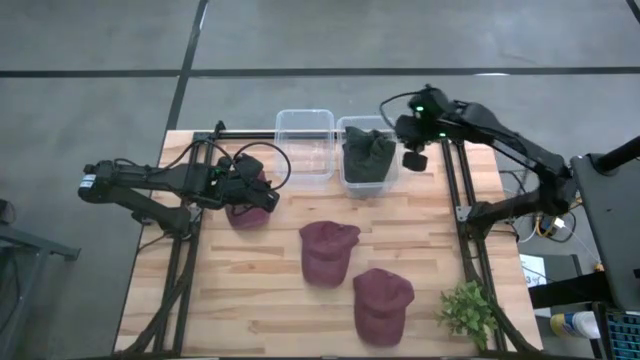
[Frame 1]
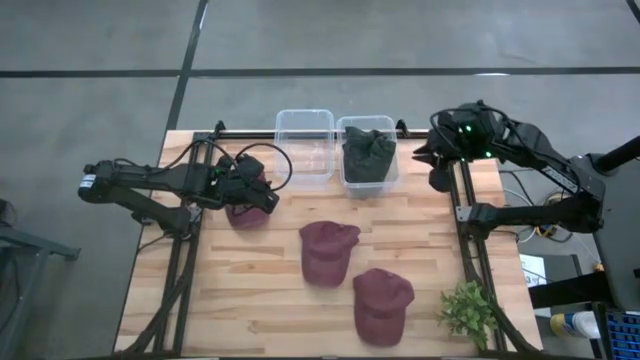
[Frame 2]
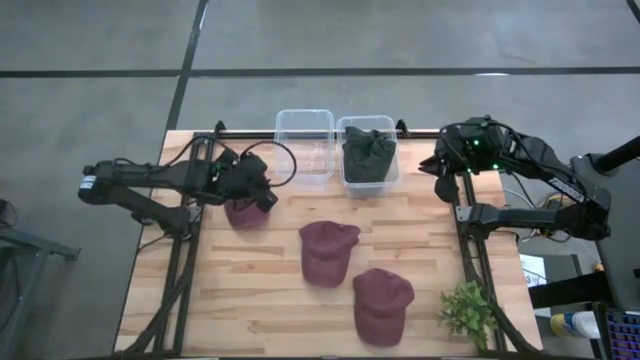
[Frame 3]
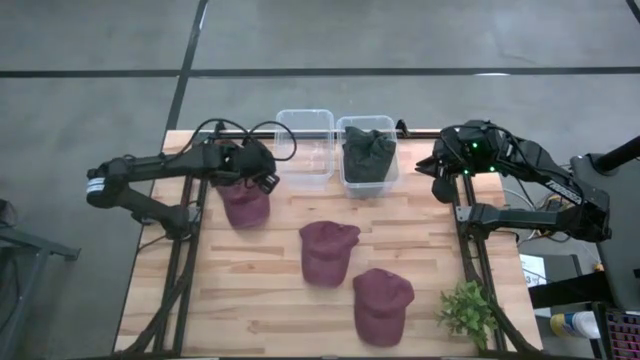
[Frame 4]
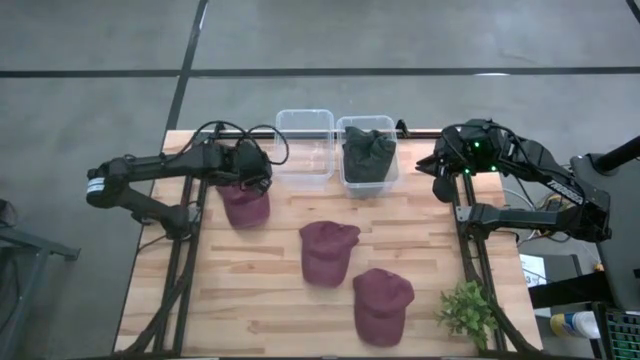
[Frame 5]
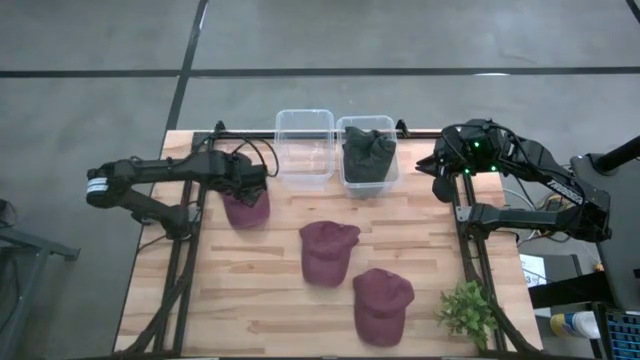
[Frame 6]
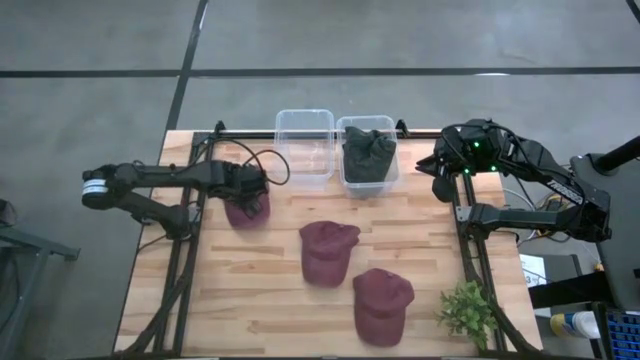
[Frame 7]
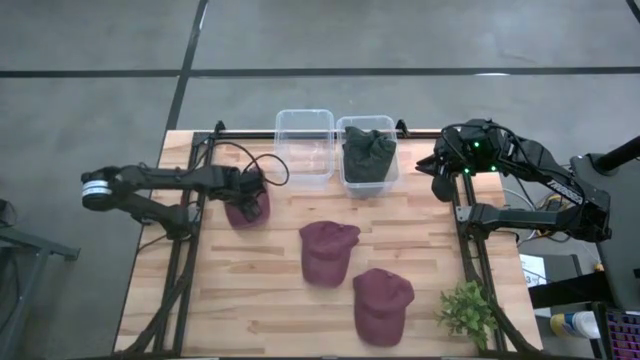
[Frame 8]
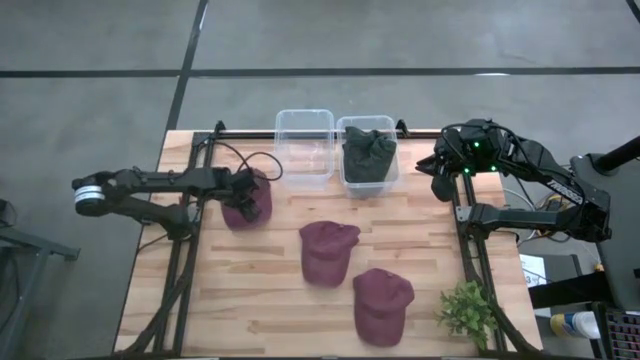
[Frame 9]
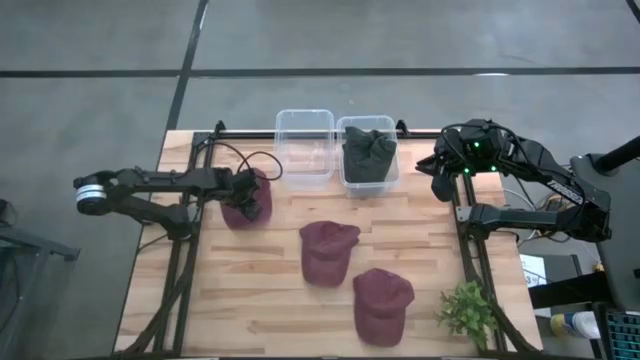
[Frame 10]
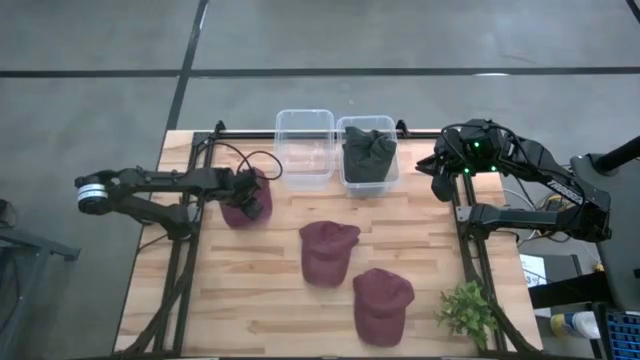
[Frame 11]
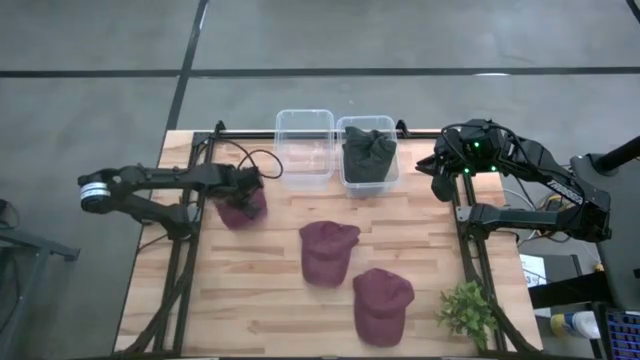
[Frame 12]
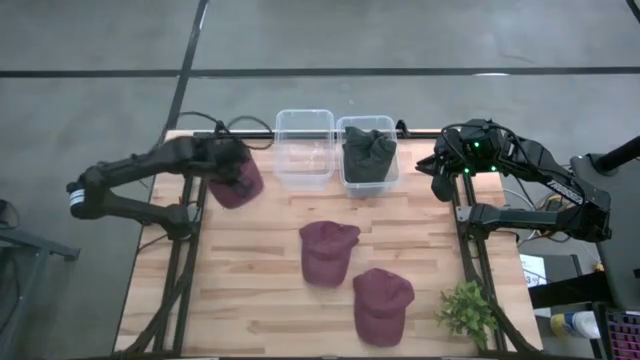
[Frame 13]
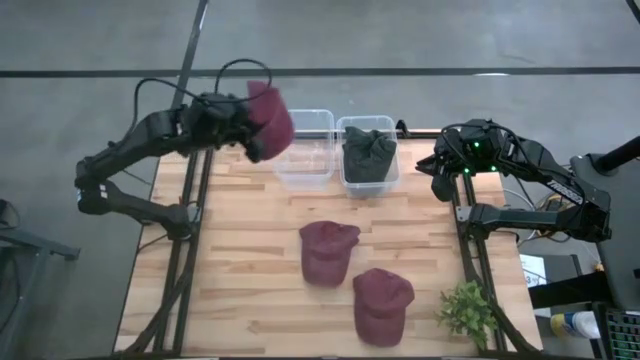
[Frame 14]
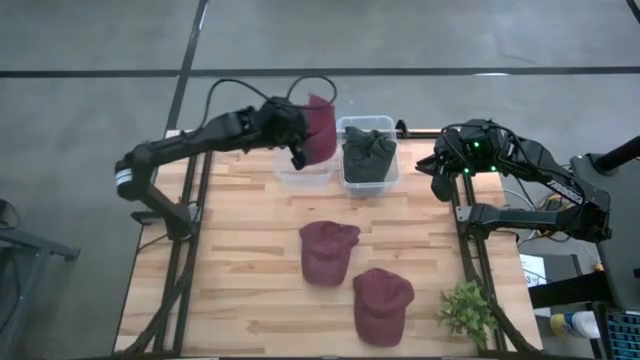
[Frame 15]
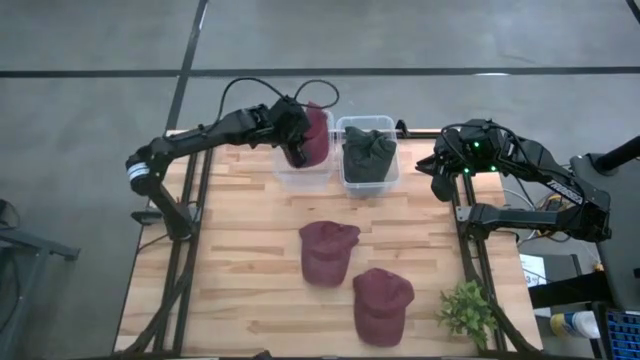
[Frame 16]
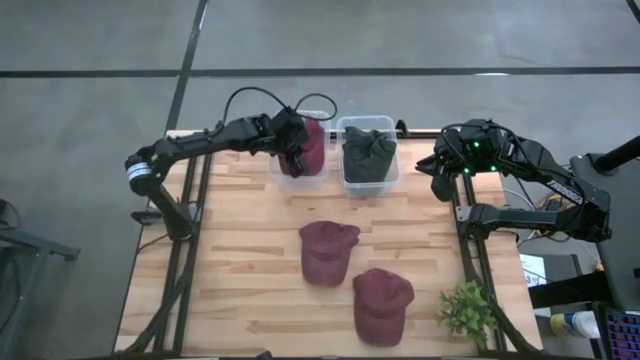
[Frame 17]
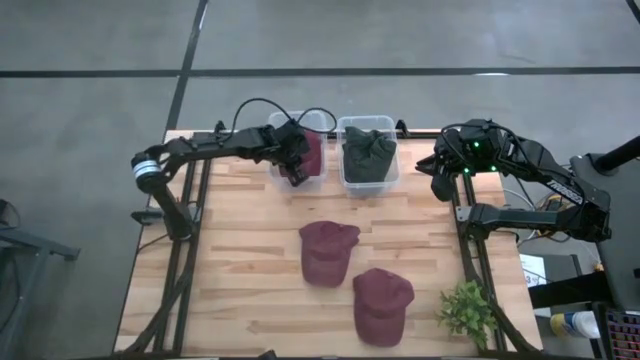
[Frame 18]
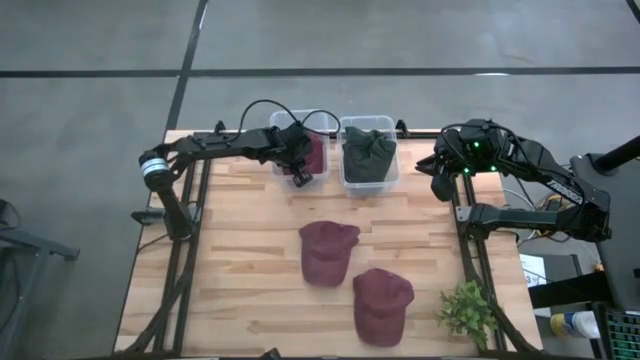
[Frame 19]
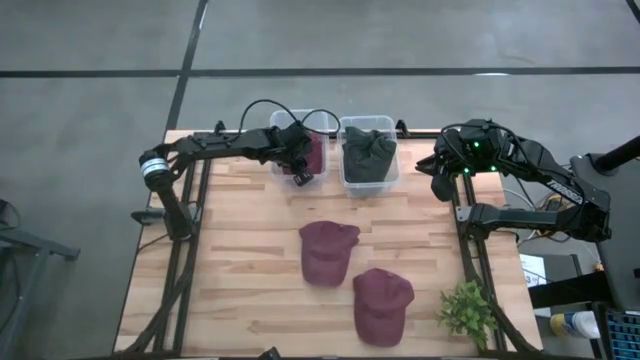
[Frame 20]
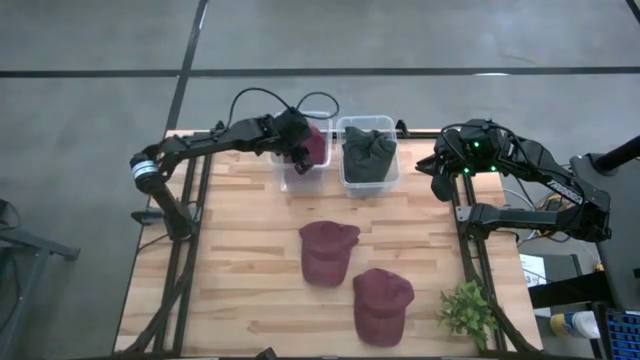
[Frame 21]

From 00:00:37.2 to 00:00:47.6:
Task: Pick & Place hat
Put the top red cap into the left transparent bin

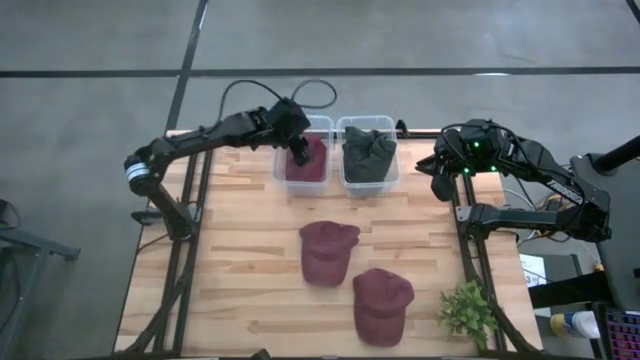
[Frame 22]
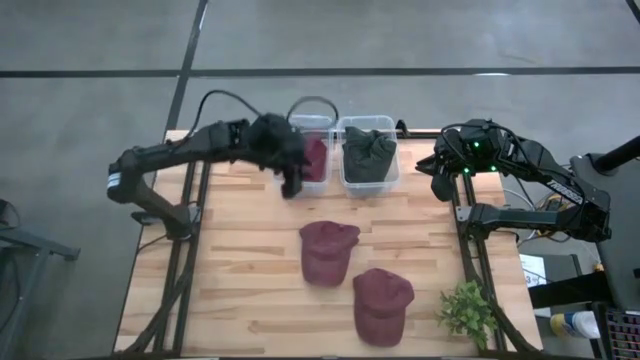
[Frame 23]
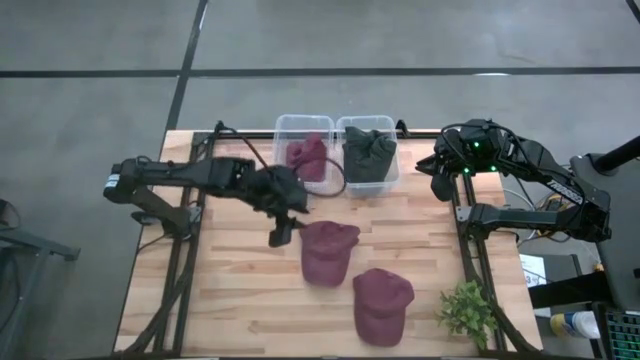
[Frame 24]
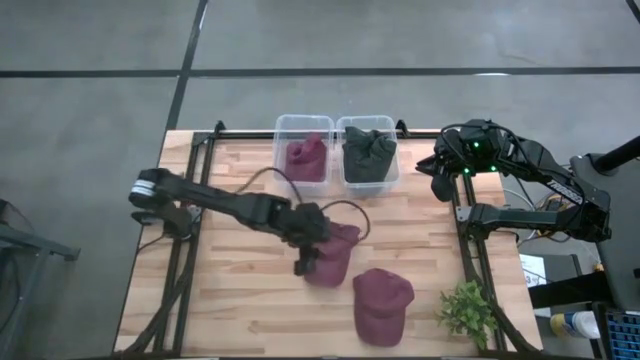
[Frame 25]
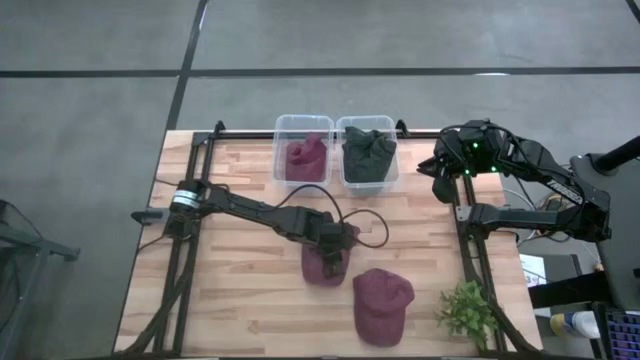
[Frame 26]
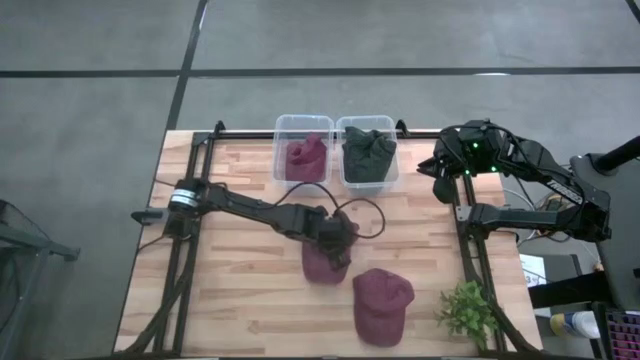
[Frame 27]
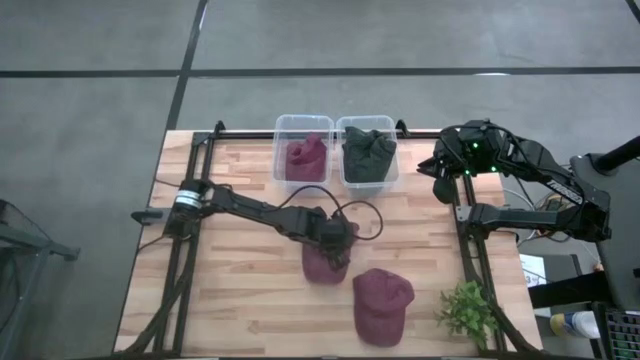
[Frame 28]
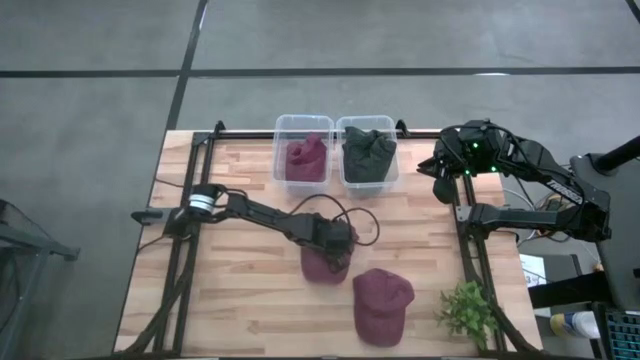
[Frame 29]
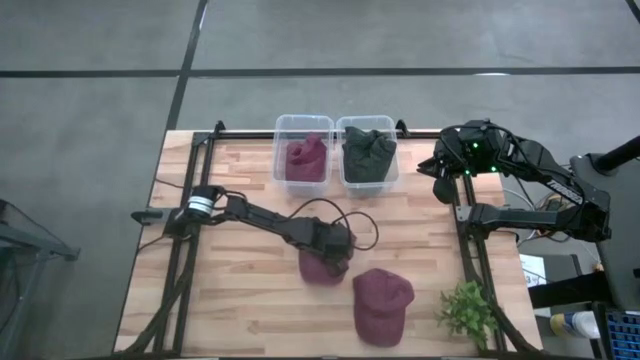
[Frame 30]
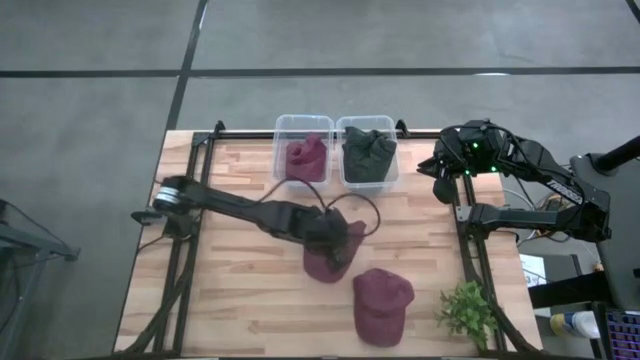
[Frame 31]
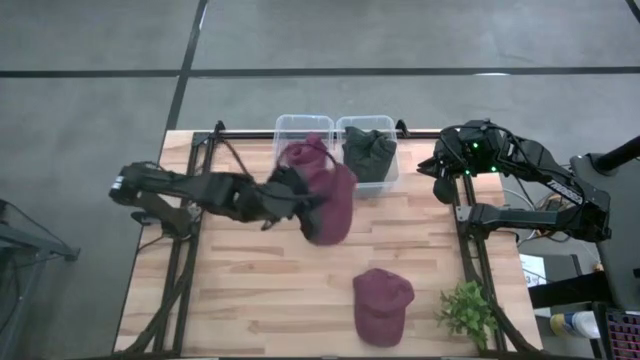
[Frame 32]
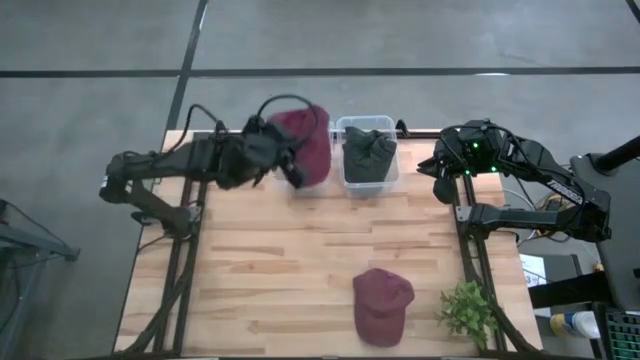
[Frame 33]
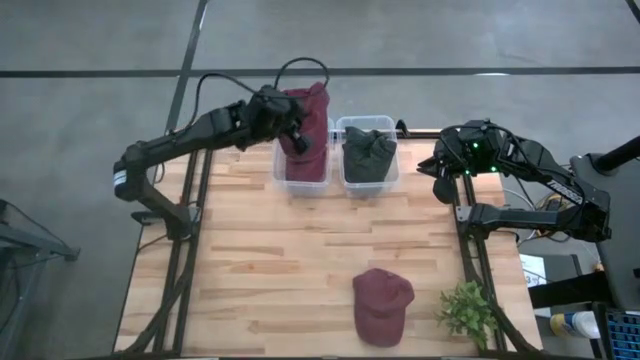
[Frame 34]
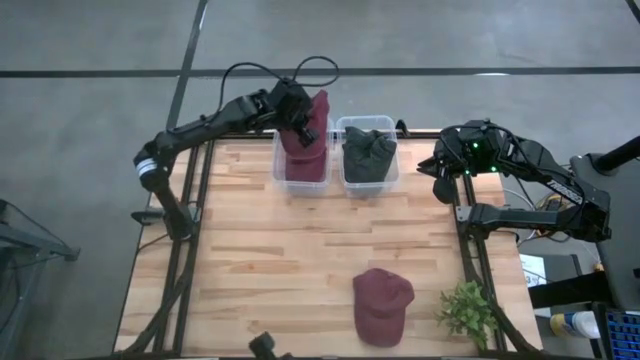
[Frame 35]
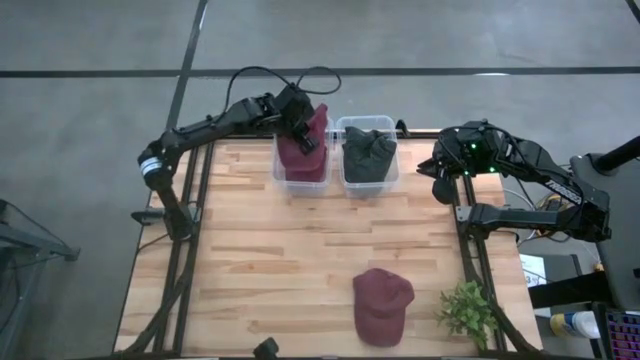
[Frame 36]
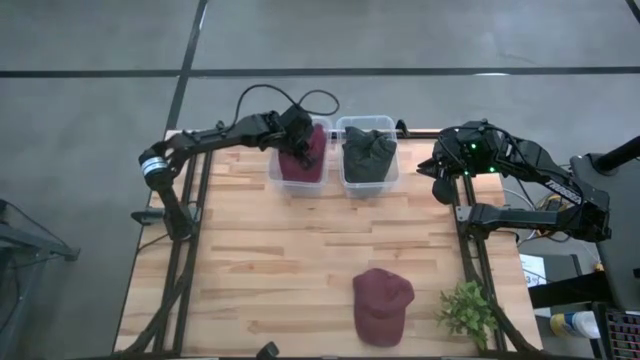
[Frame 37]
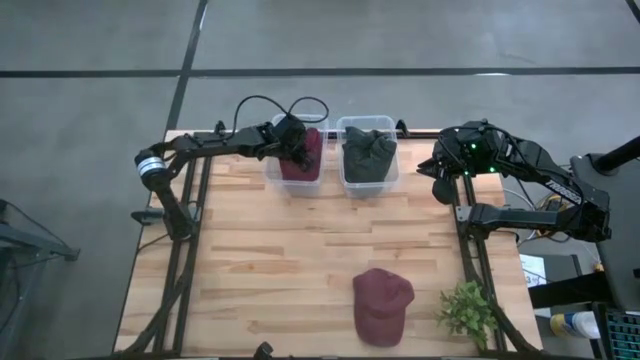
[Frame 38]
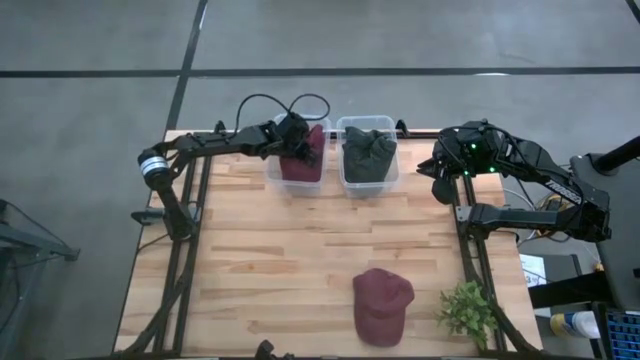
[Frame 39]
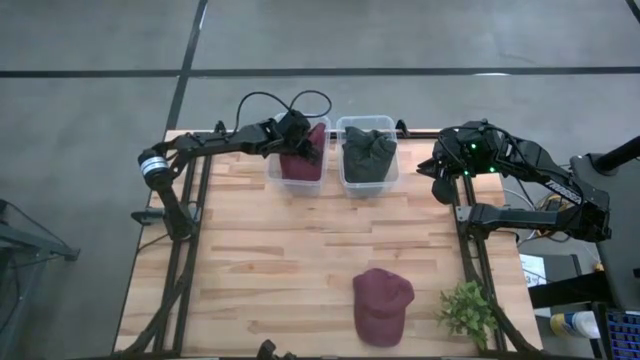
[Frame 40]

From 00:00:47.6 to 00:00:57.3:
Put the top red cap into the left transparent bin

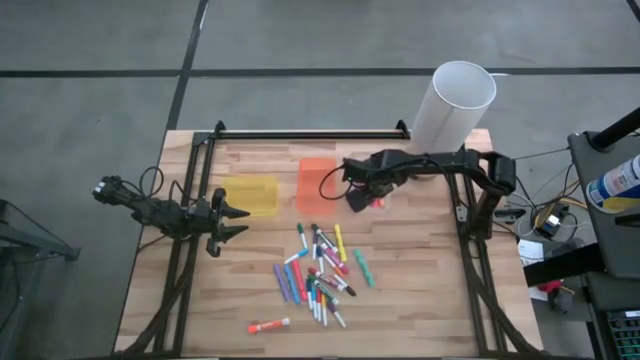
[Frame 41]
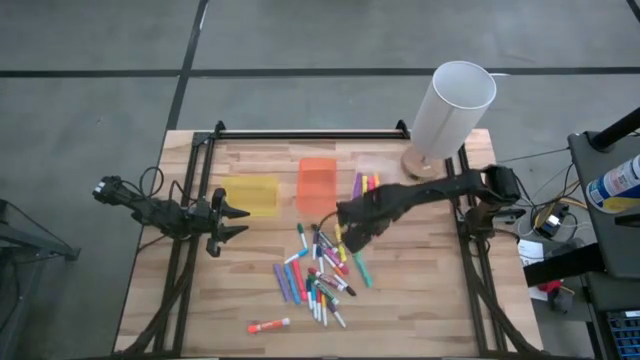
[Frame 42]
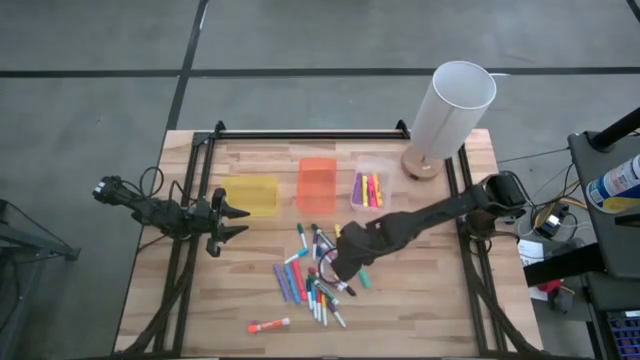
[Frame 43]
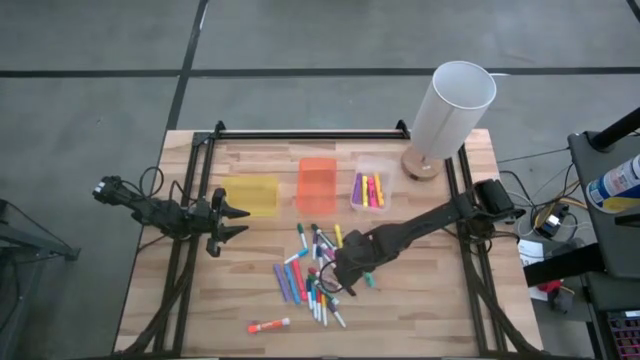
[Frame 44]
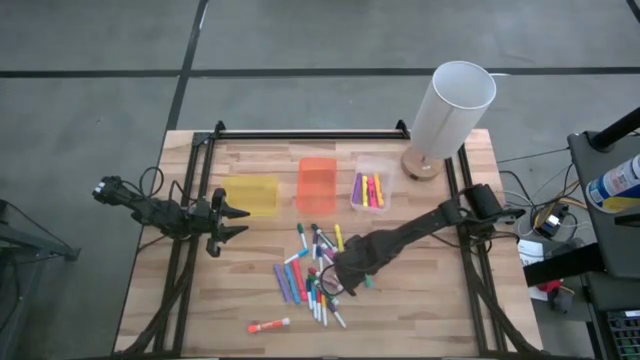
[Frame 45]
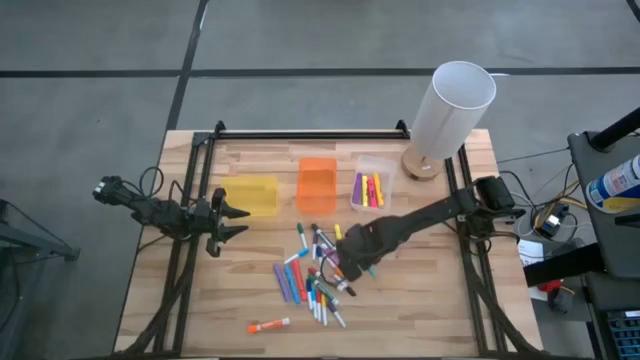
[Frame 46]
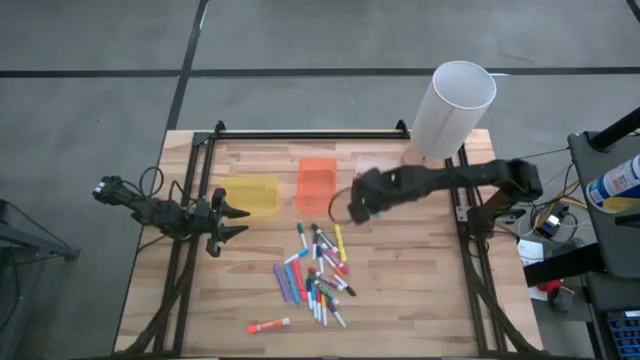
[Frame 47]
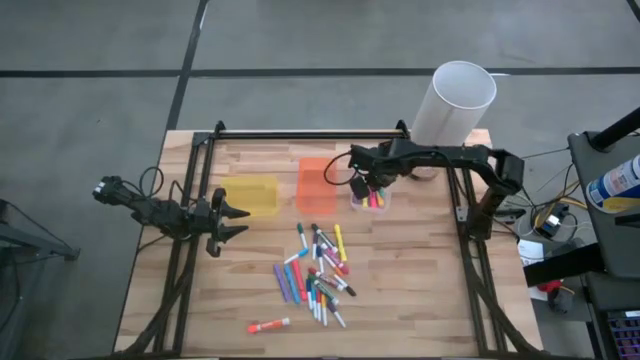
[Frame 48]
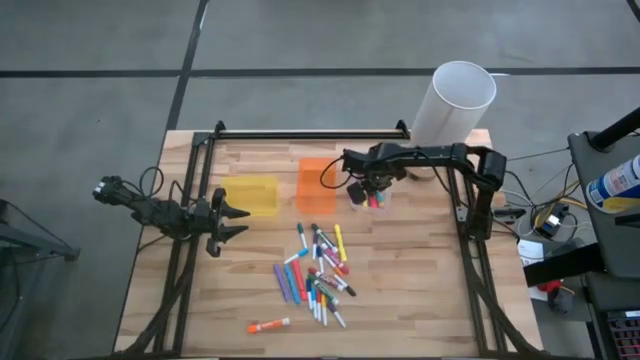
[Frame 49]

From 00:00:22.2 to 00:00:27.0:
Task: Pick & Place Markers
Put the blue highlighter into the transparent bin
